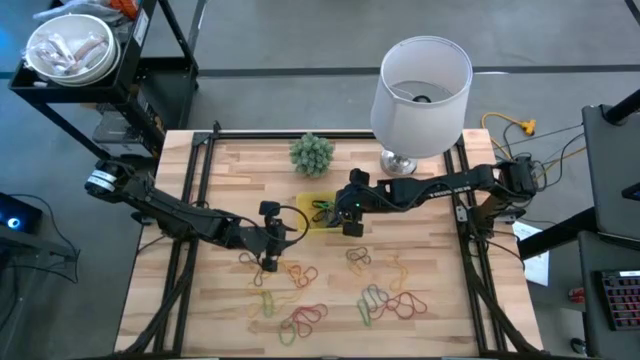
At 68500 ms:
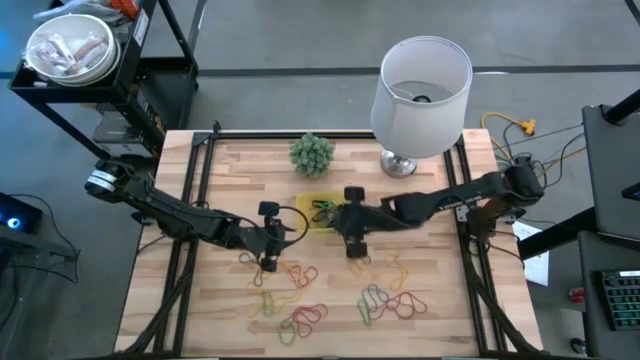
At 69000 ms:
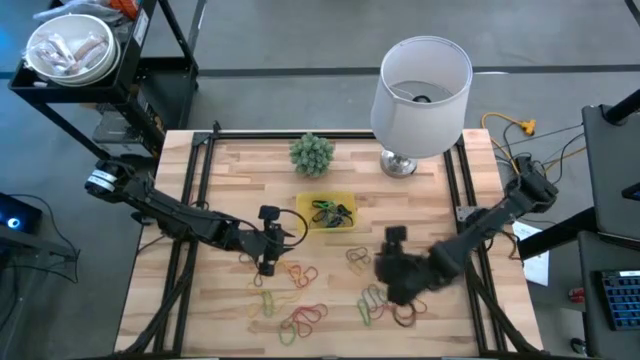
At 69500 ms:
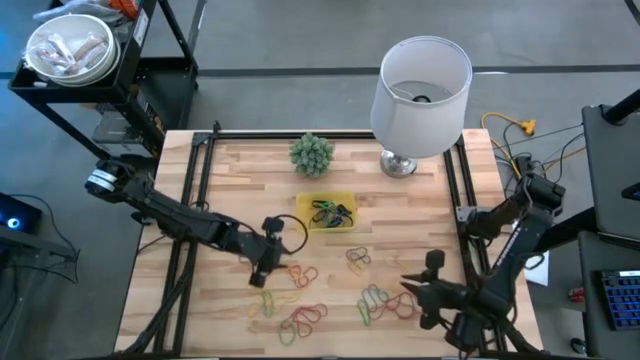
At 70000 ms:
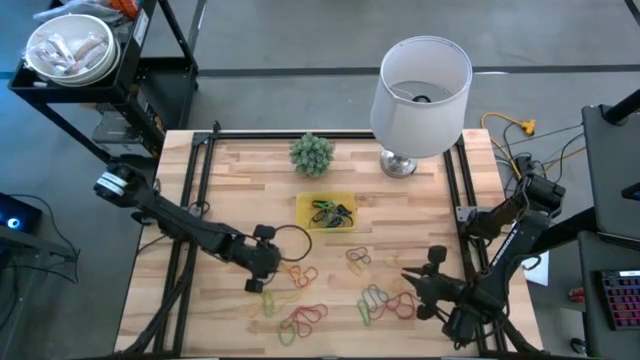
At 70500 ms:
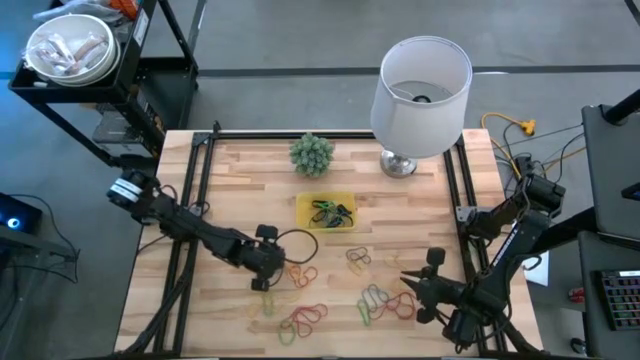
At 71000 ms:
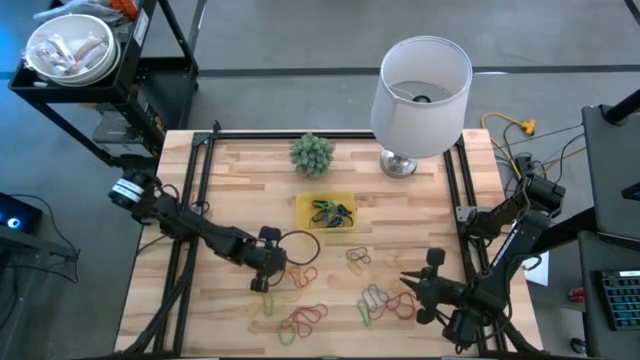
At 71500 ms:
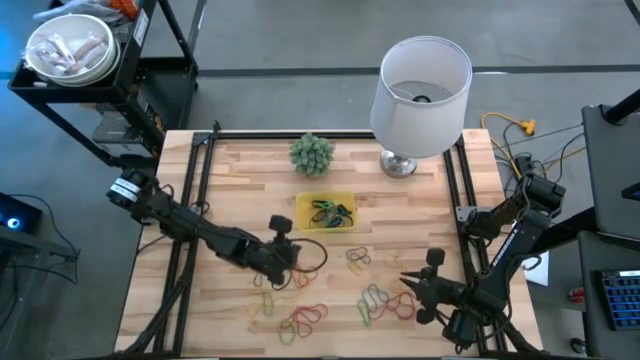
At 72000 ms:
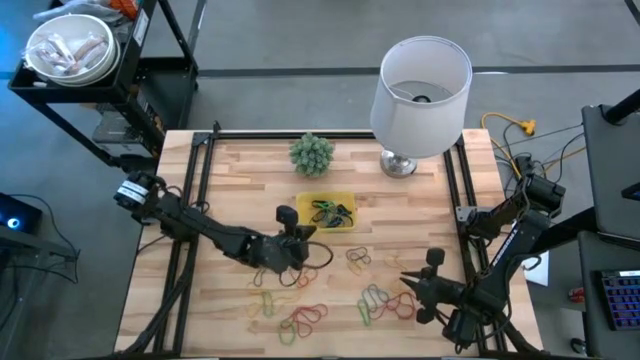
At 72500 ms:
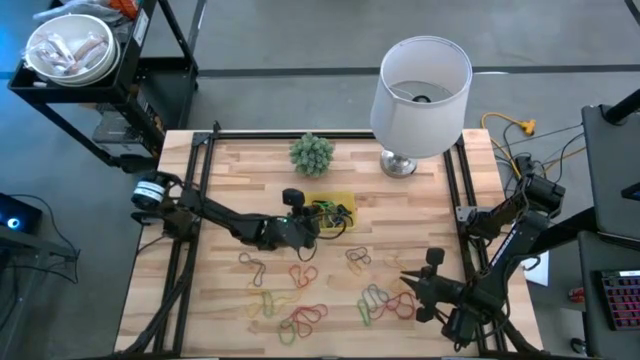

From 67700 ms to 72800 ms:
Task: Pick and place rubber bands into bin
Put the yellow rubber band into the yellow bin

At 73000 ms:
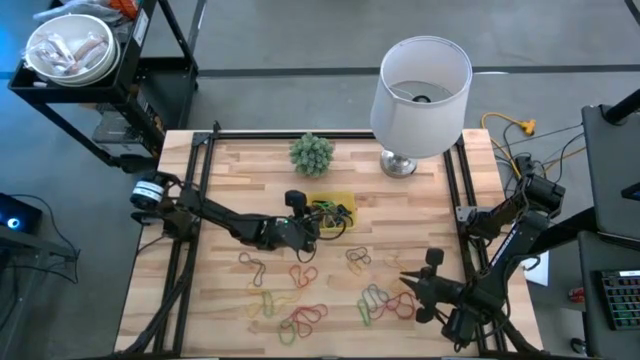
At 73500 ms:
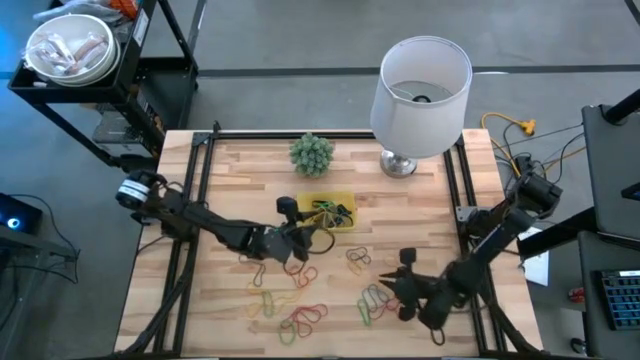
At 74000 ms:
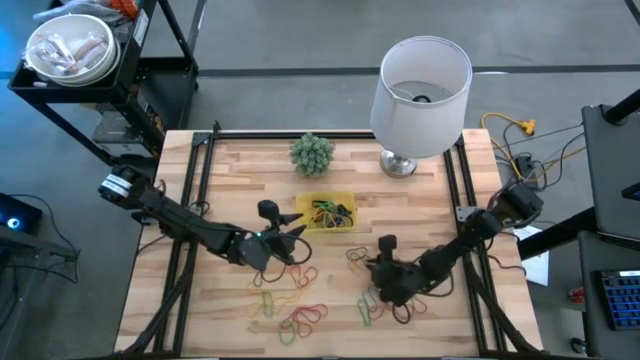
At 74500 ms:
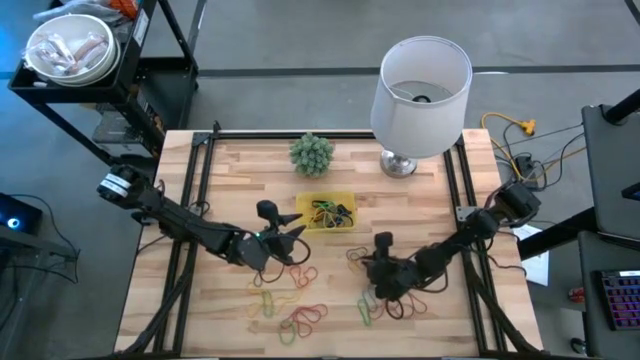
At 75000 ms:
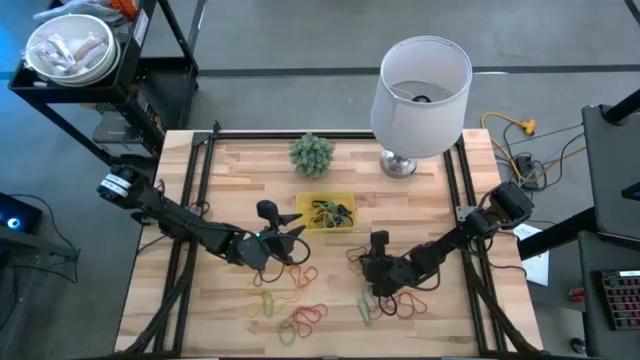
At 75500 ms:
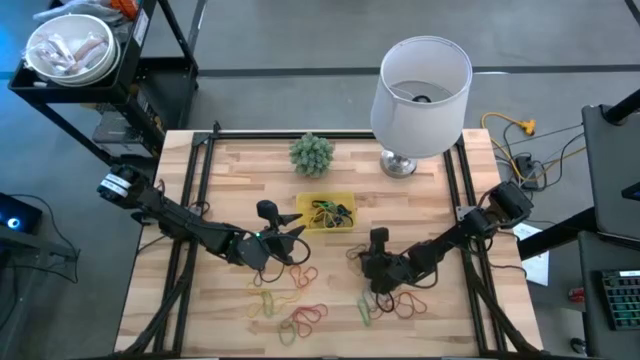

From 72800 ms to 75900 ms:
Put the purple rubber band into the yellow bin

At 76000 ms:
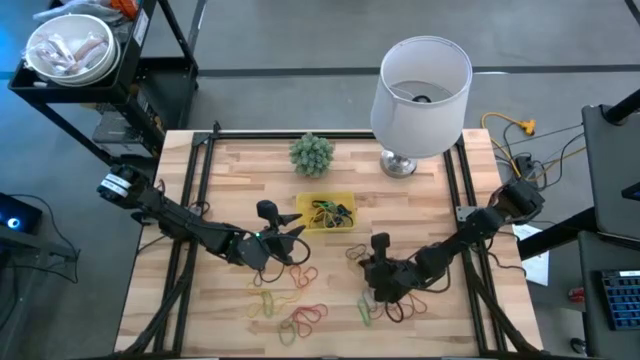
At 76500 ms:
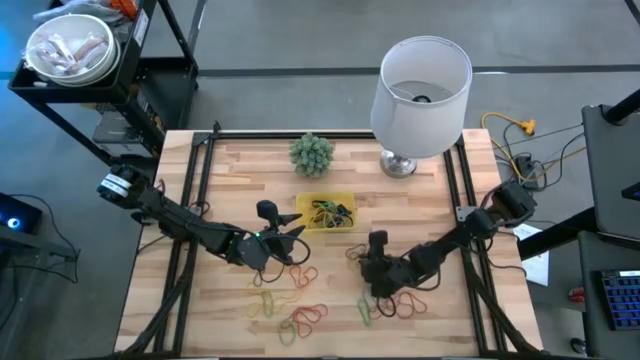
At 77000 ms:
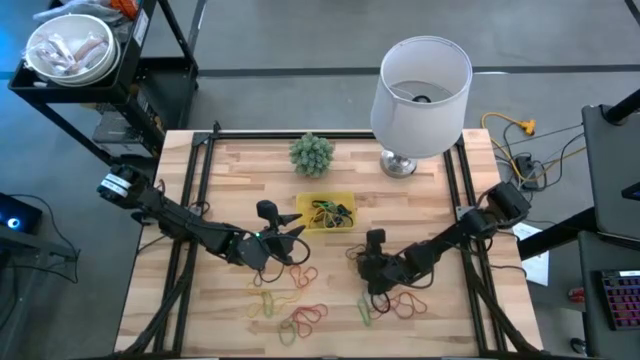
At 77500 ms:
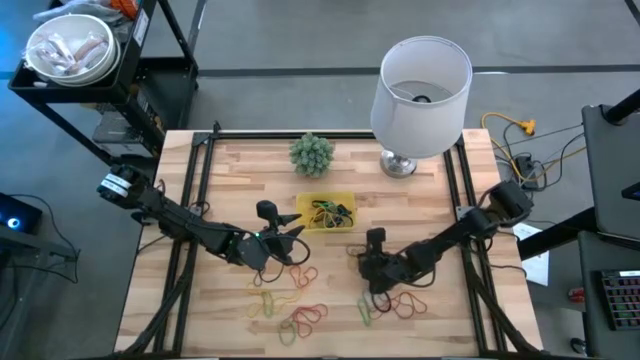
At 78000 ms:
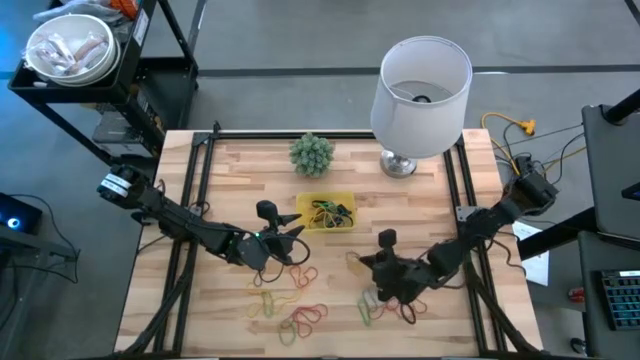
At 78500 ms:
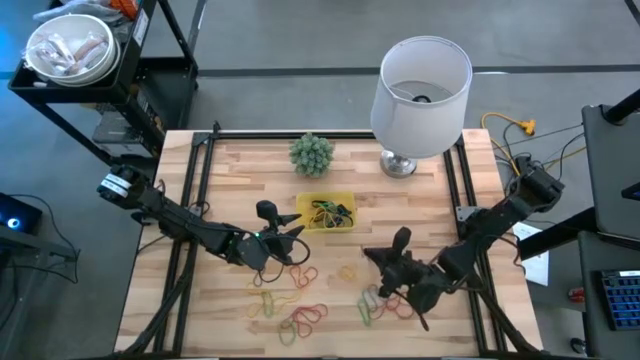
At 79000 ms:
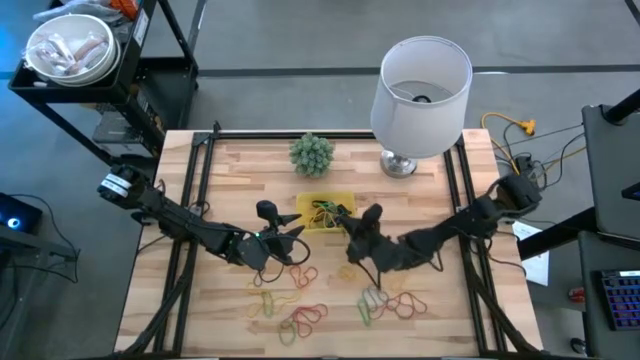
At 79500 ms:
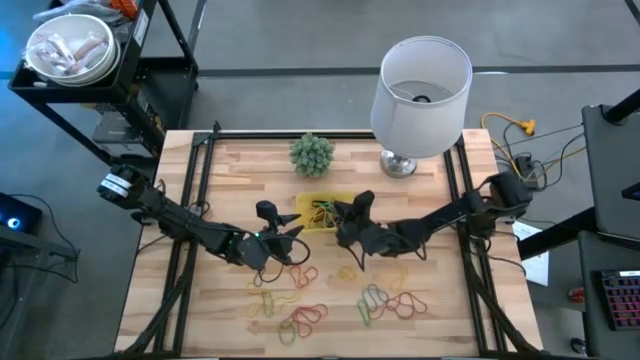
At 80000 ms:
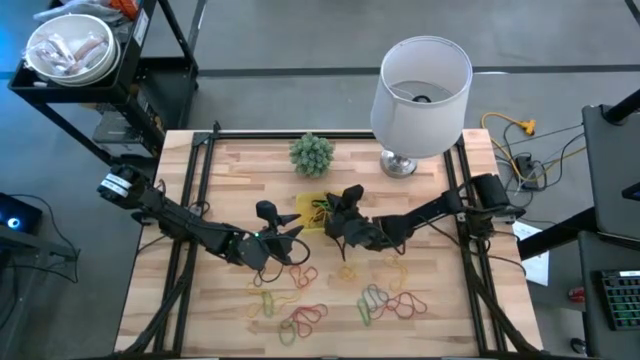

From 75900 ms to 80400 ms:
Put the purple rubber band into the yellow bin

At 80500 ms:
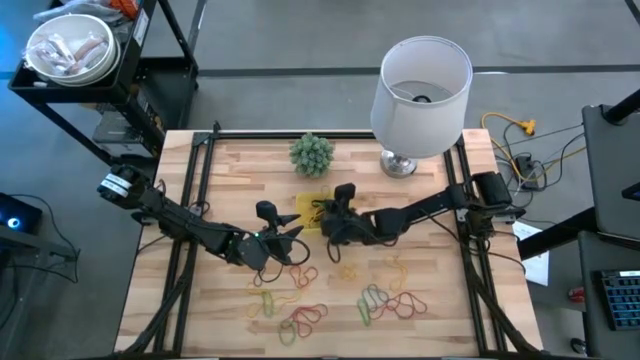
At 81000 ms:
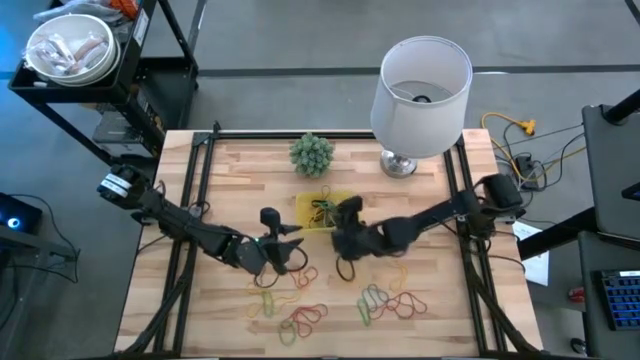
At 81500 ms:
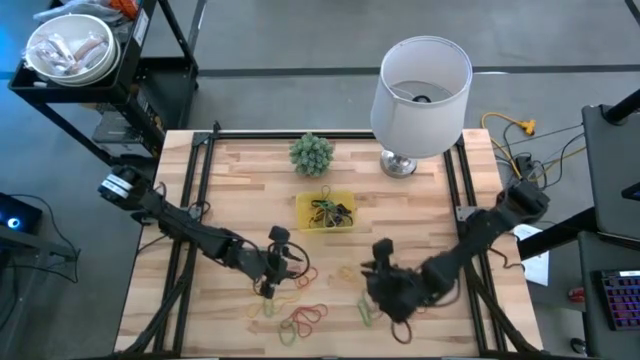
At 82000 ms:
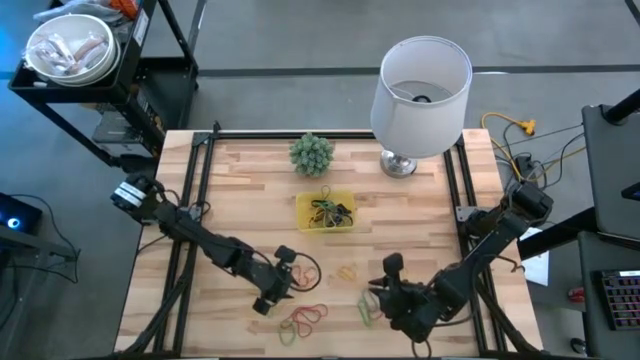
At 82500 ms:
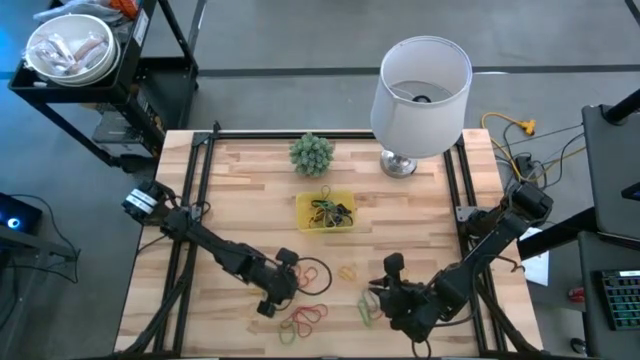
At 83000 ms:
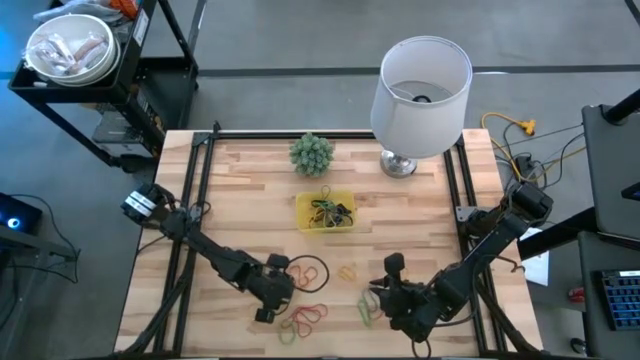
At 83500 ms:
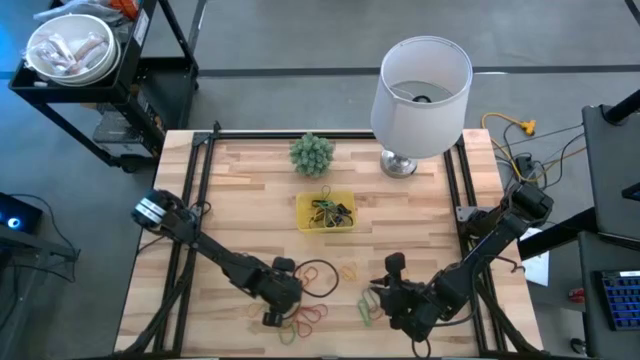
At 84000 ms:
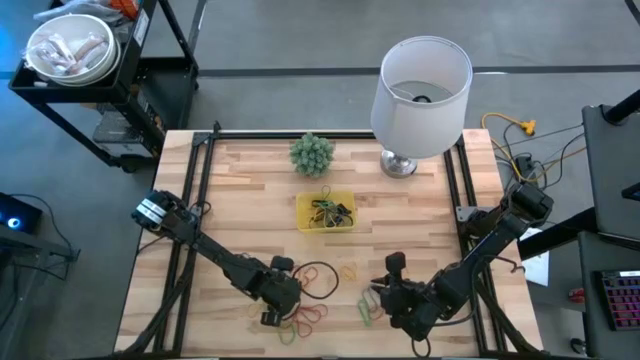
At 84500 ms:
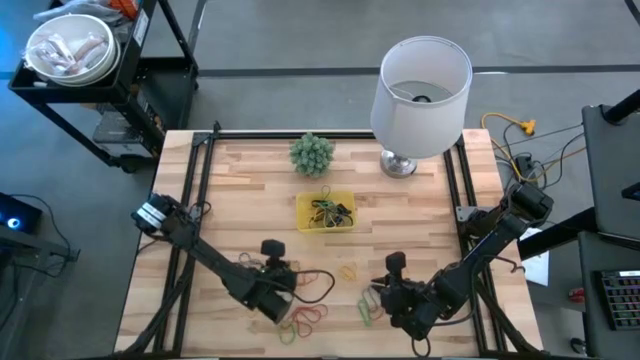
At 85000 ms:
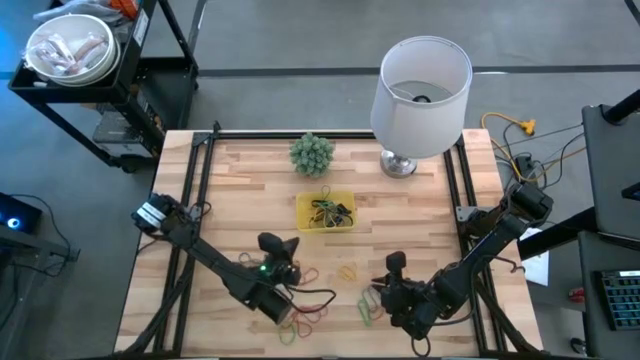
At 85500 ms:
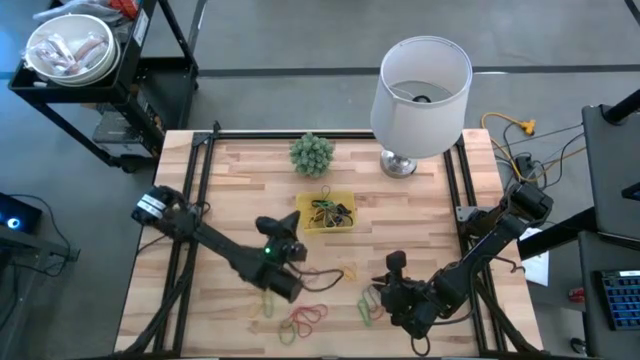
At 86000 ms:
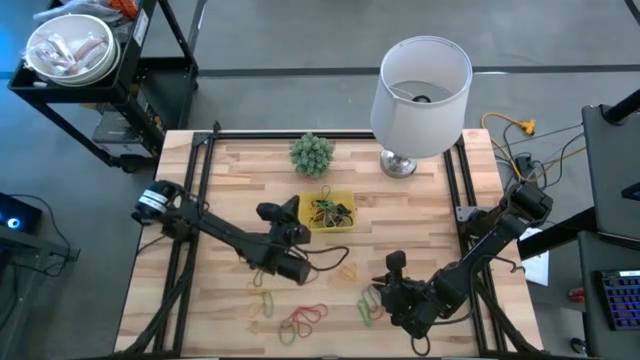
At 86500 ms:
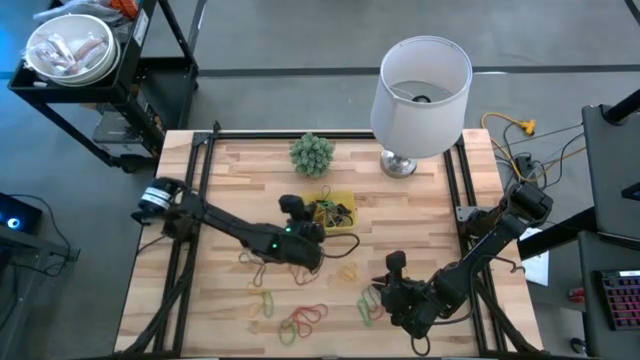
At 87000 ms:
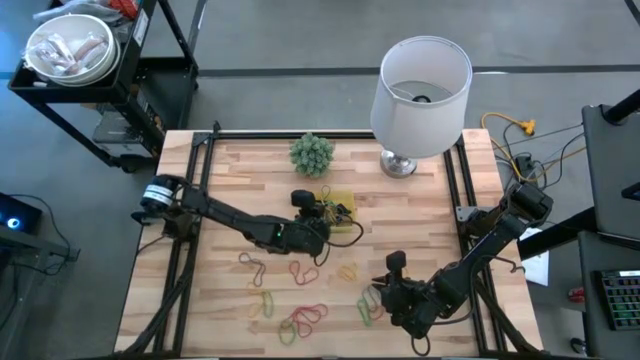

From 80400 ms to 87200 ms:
Put the yellow rubber band into the yellow bin

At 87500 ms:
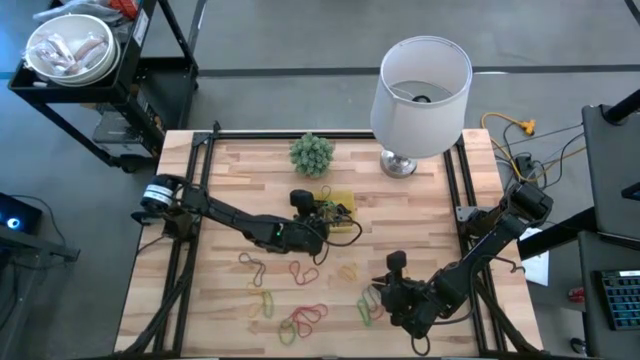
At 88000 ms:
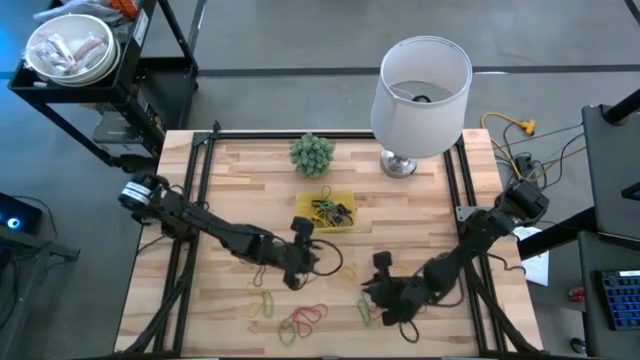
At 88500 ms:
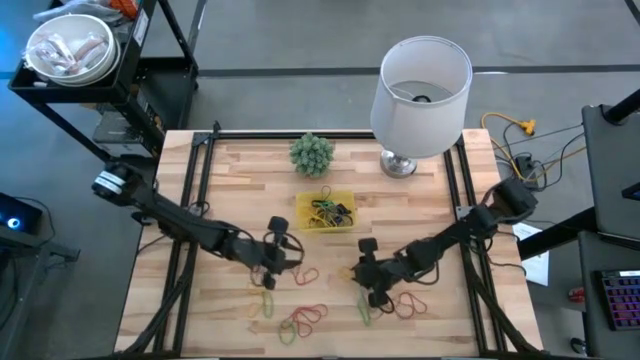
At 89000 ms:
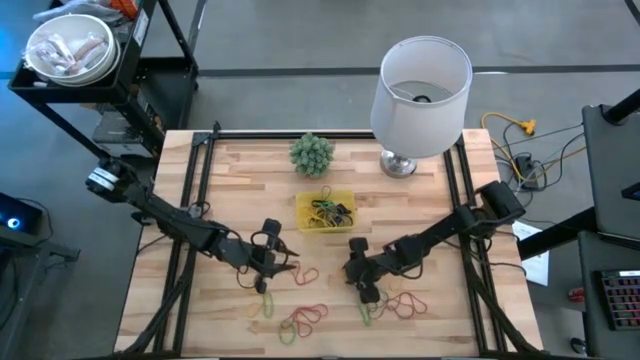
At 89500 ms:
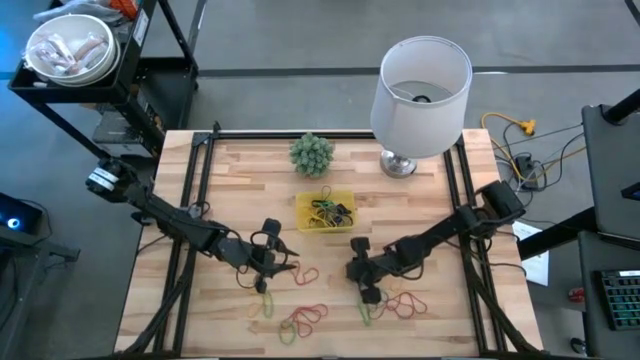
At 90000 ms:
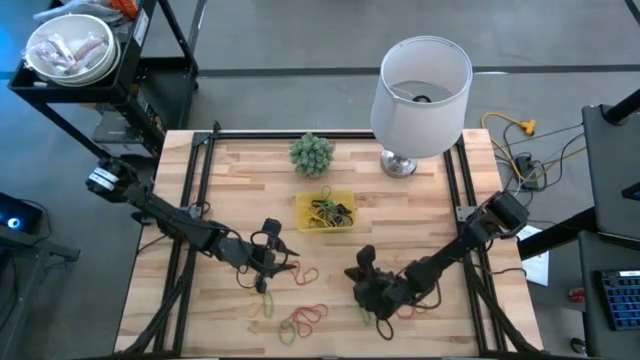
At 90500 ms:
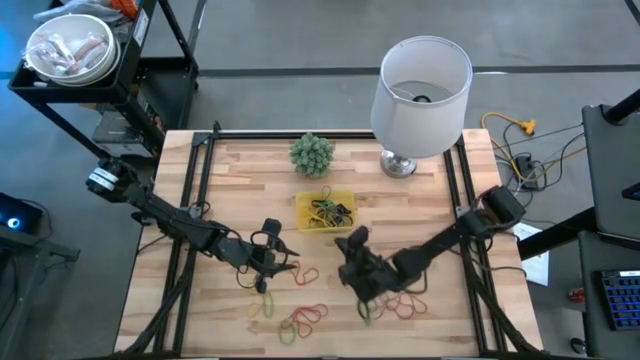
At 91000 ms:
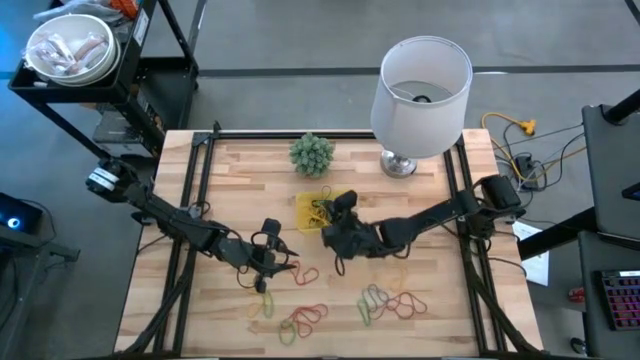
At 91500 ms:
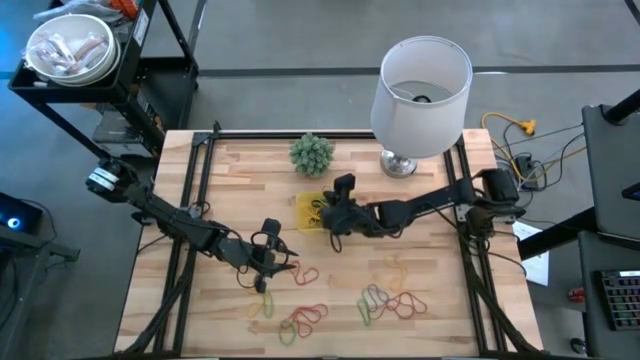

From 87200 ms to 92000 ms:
Put the yellow rubber band into the yellow bin
